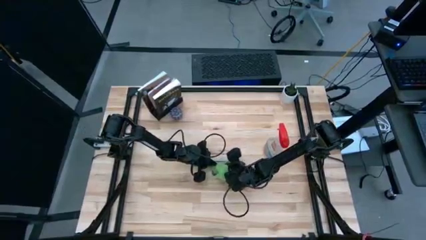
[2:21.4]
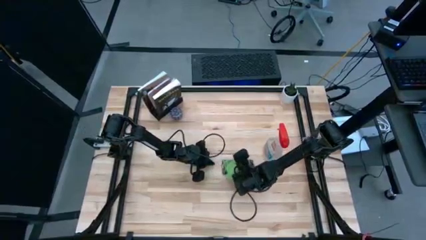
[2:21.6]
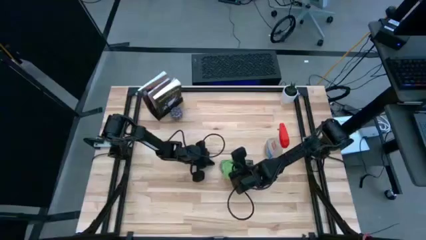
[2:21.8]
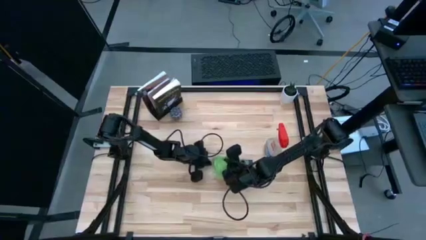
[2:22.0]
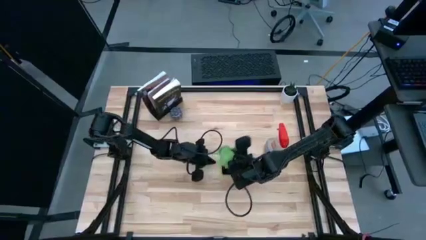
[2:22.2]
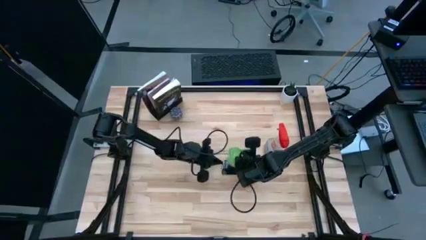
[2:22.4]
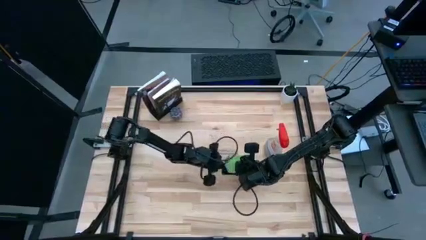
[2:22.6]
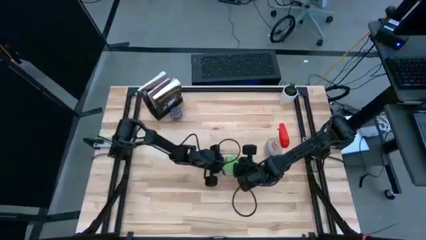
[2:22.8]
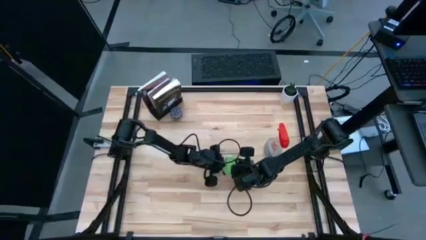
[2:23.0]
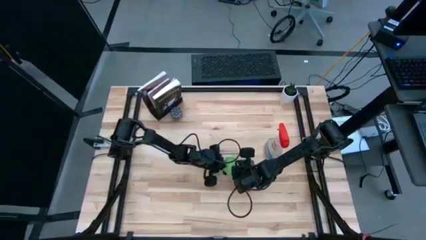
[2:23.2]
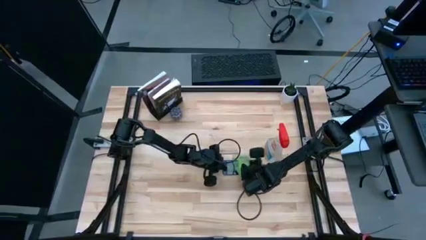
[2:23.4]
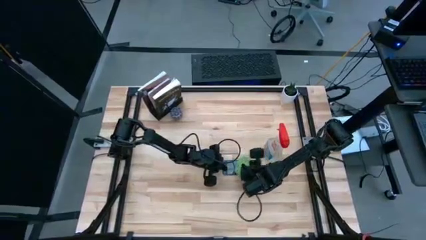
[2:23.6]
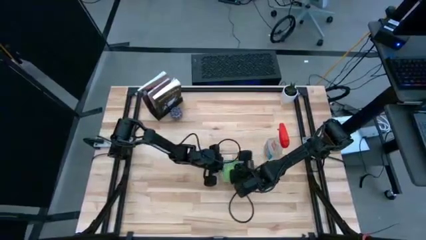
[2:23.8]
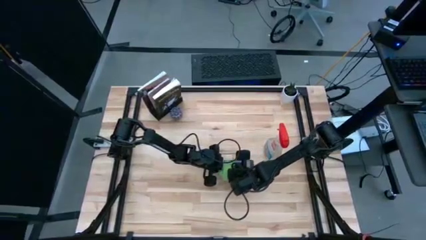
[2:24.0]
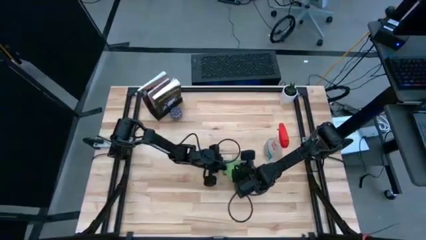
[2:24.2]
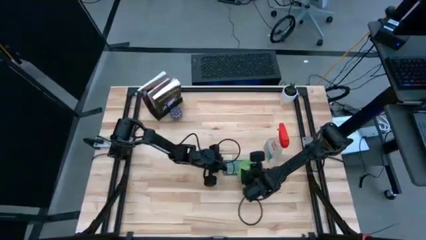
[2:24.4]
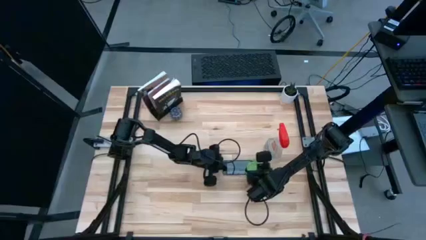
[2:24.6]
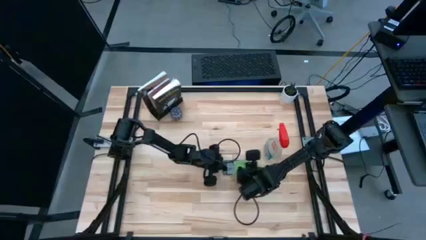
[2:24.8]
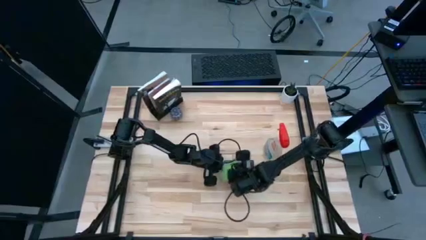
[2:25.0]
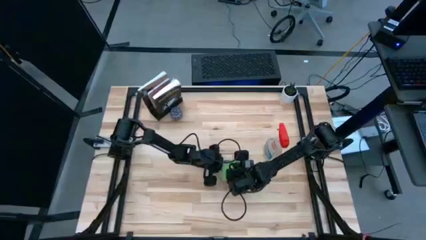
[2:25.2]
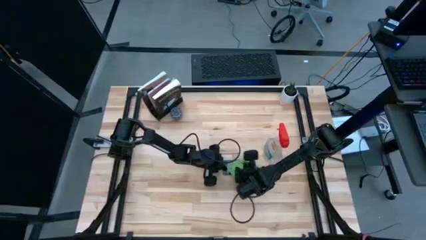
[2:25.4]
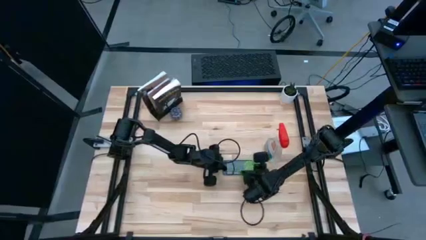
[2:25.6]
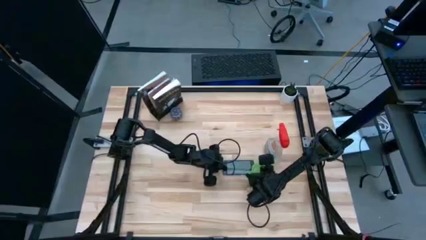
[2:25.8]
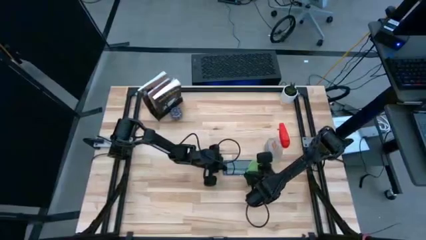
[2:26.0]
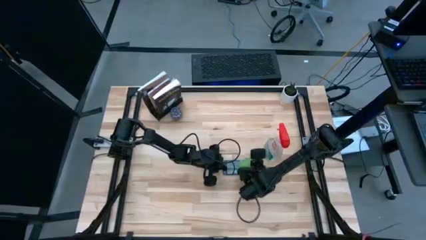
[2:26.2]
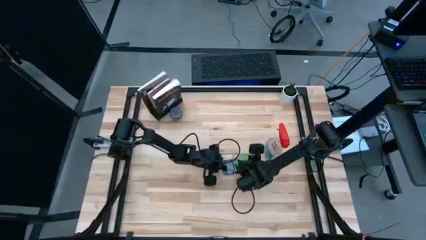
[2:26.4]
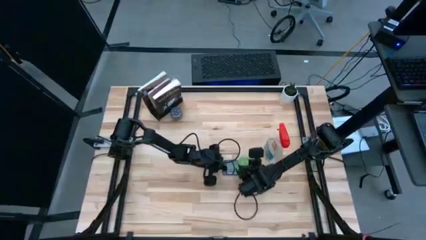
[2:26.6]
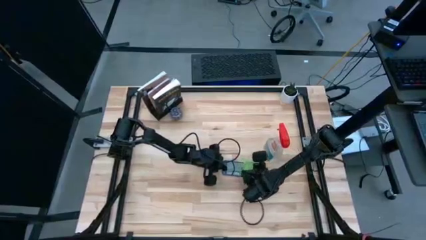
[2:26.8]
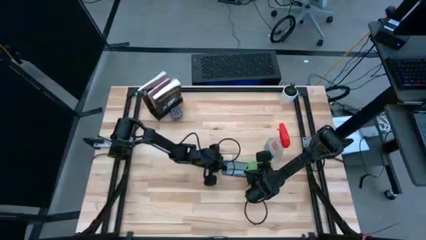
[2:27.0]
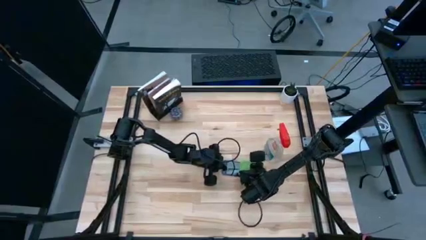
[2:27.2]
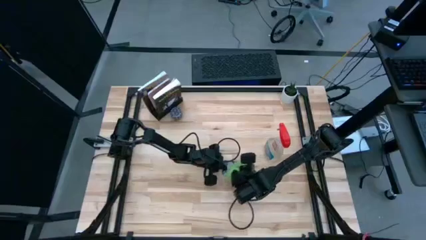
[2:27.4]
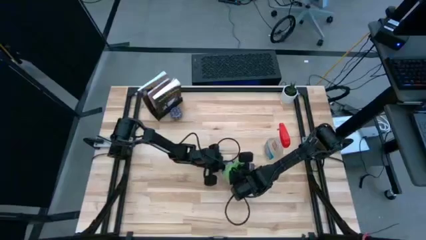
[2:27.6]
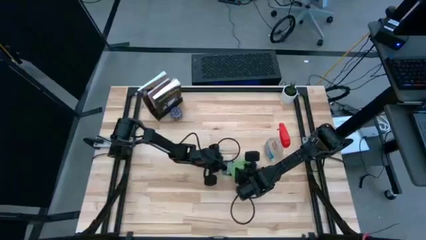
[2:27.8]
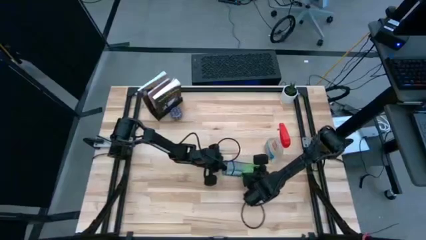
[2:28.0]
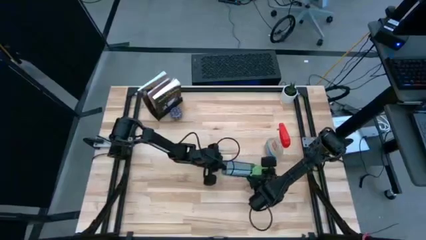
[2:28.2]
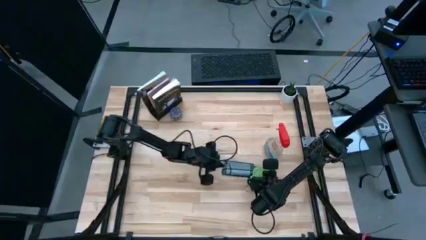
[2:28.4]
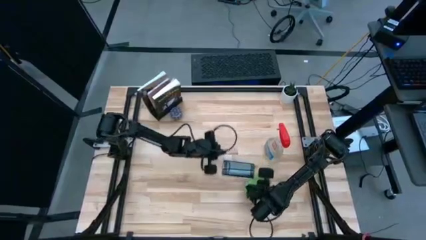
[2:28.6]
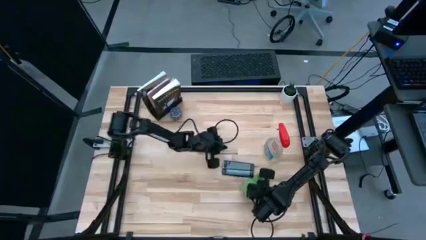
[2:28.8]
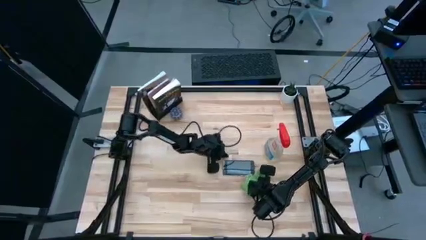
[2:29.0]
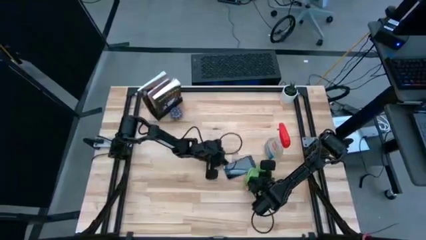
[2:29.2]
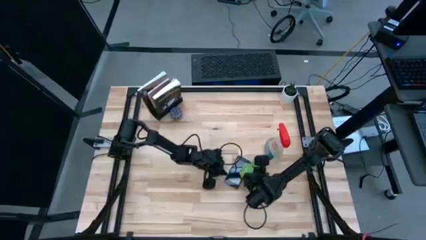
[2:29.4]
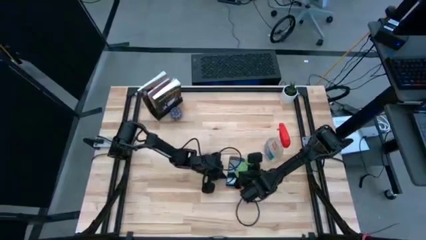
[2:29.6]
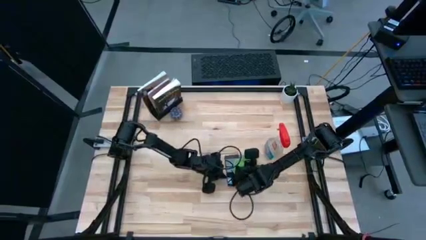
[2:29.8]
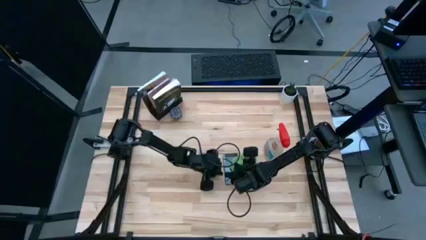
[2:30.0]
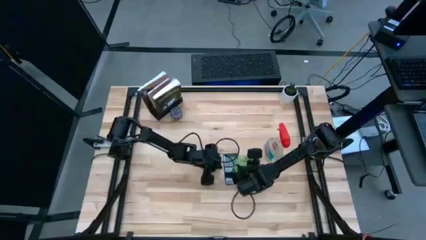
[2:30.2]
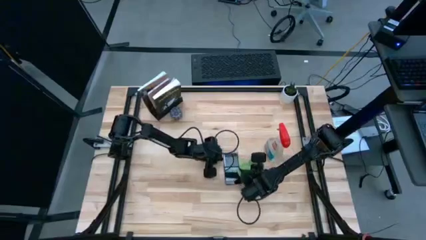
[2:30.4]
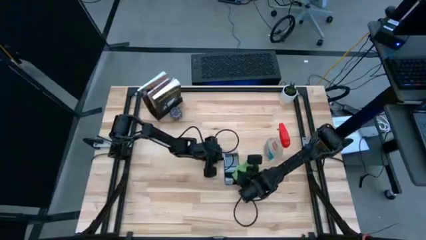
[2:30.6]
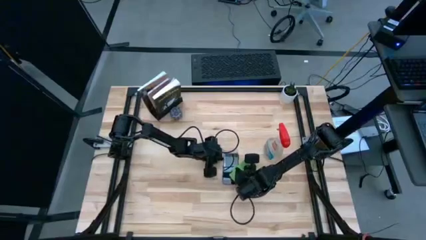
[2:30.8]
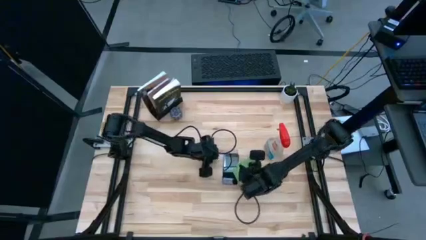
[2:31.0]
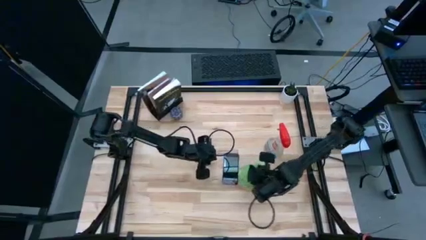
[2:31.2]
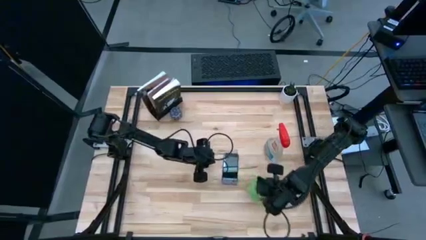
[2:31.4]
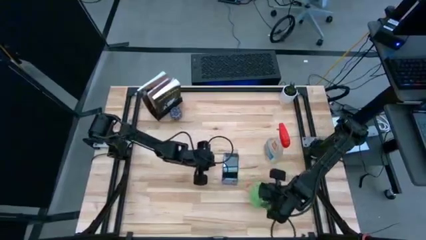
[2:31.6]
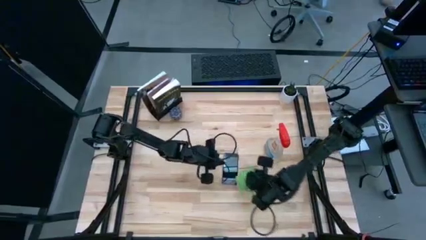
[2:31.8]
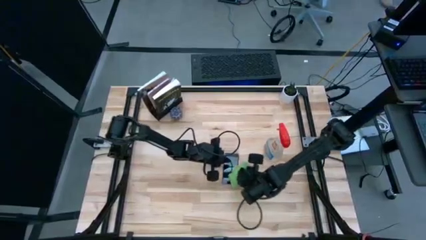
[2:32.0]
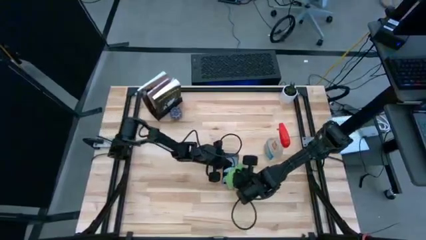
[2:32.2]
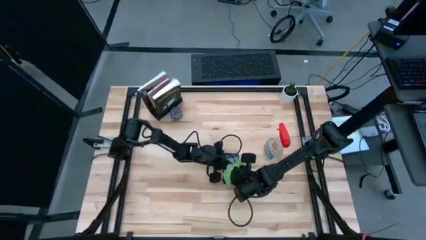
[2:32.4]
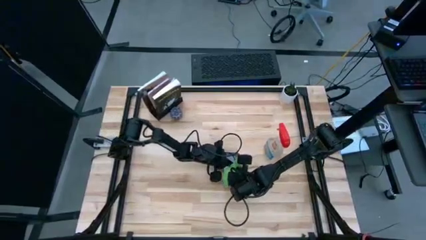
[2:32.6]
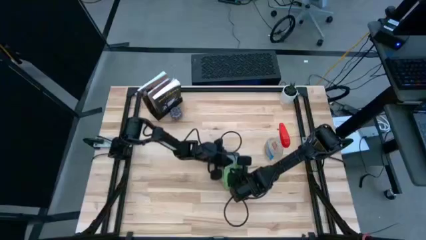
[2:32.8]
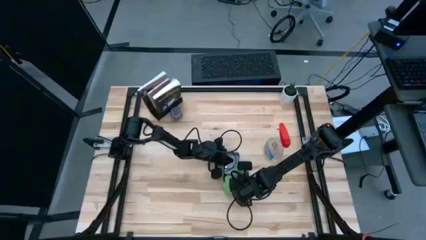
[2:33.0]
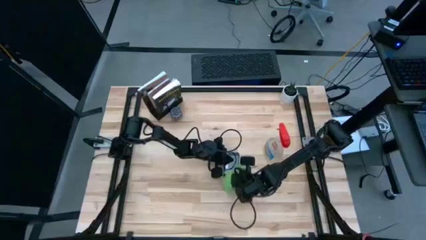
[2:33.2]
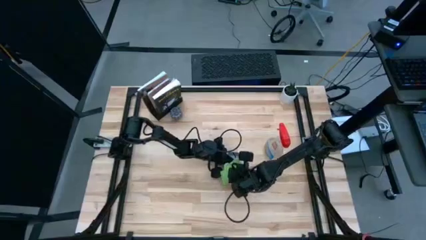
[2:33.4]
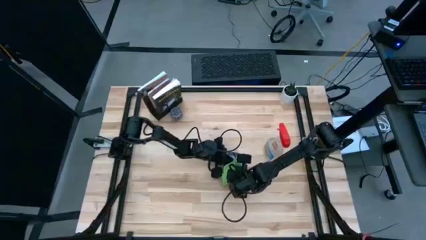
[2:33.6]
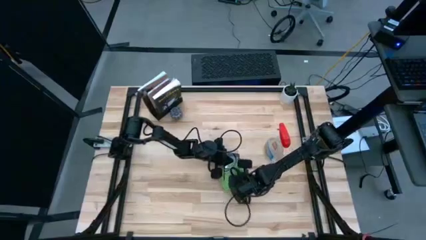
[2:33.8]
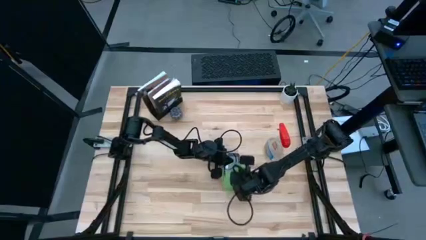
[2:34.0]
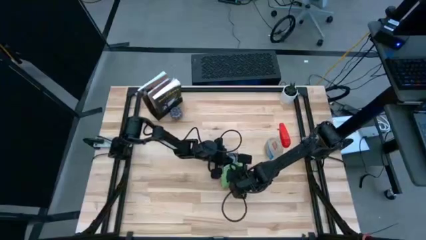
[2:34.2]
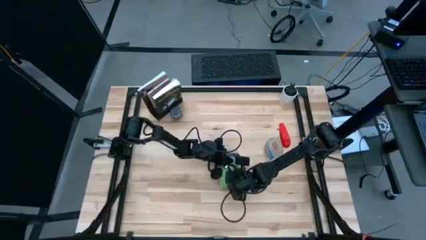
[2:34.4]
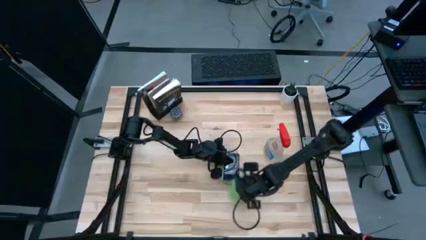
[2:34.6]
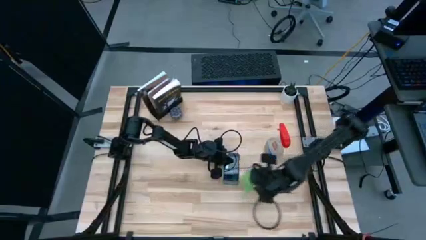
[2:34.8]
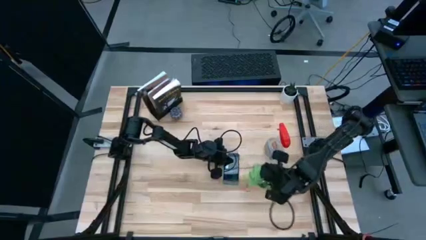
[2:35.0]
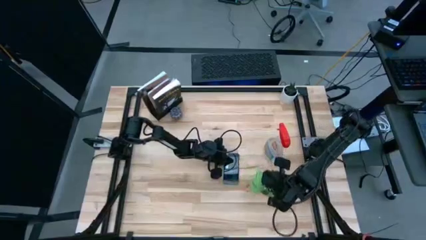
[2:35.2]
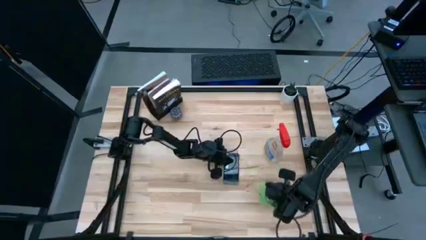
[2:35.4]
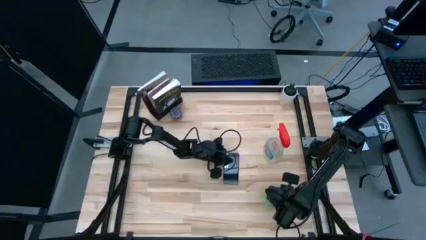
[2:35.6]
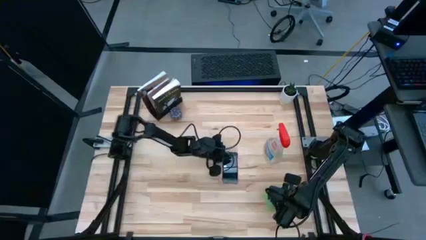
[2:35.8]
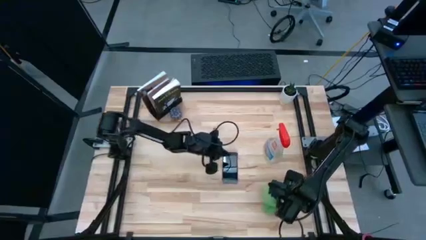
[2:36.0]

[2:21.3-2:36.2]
Task: Apply microfiber cloth
Wipe the front of the pink cellphone with the green microfiber cloth
